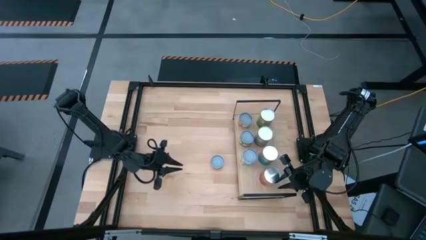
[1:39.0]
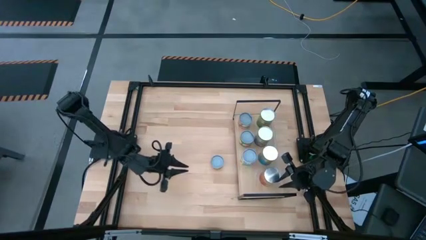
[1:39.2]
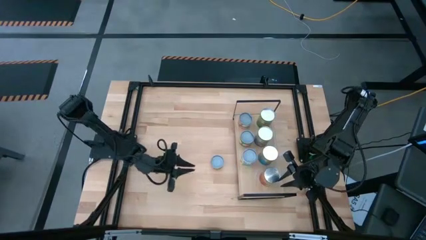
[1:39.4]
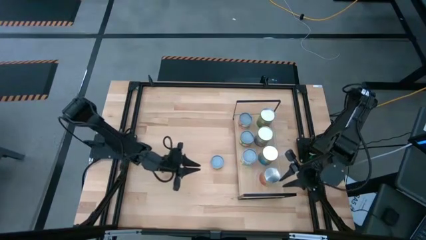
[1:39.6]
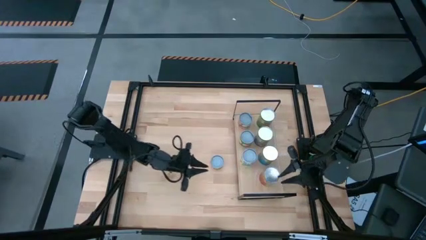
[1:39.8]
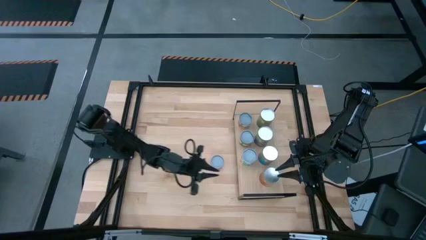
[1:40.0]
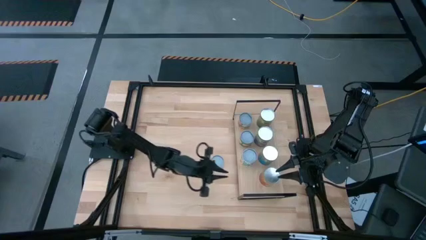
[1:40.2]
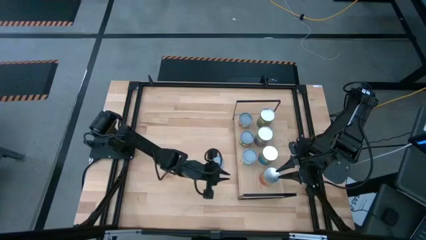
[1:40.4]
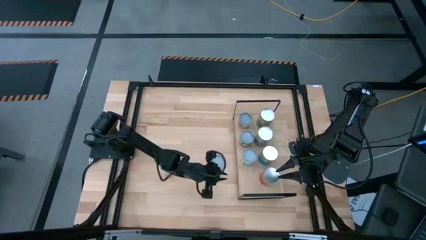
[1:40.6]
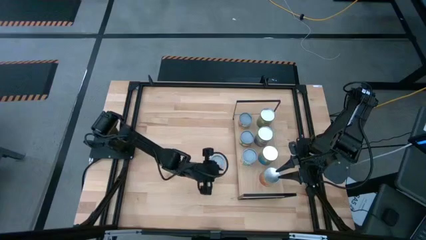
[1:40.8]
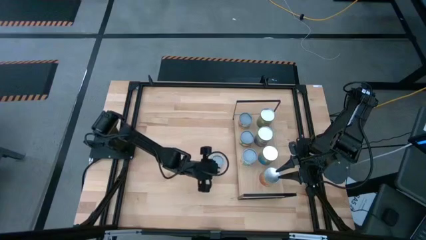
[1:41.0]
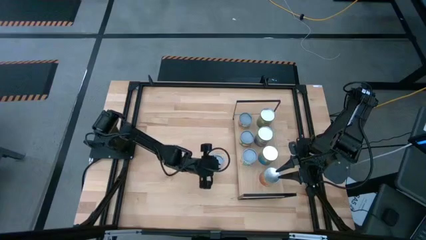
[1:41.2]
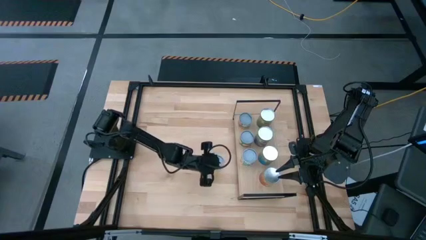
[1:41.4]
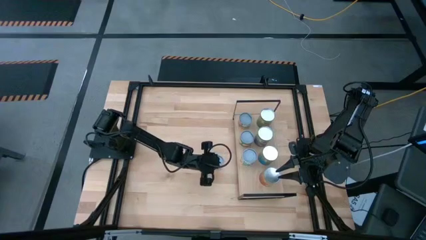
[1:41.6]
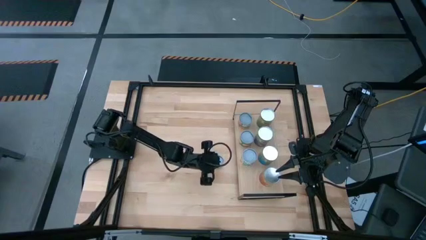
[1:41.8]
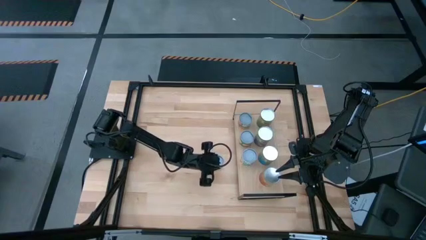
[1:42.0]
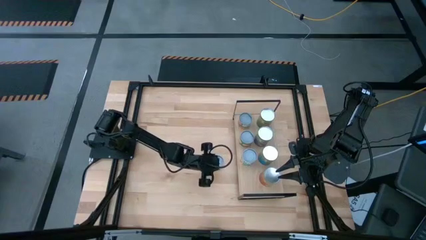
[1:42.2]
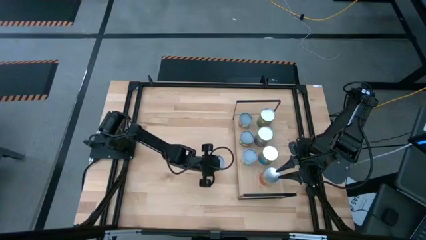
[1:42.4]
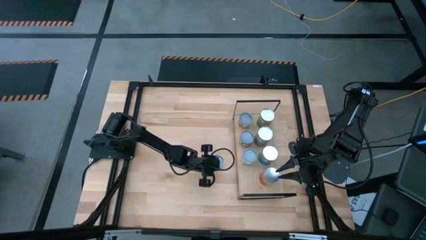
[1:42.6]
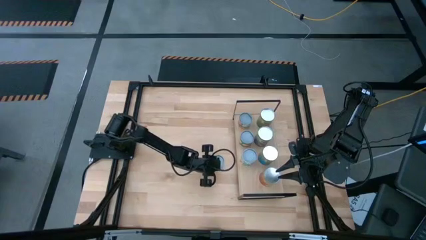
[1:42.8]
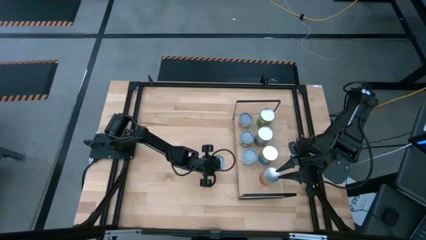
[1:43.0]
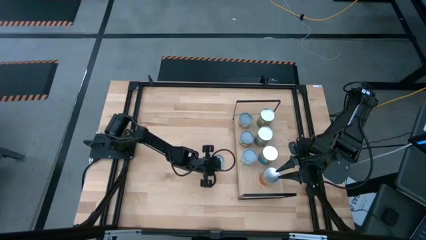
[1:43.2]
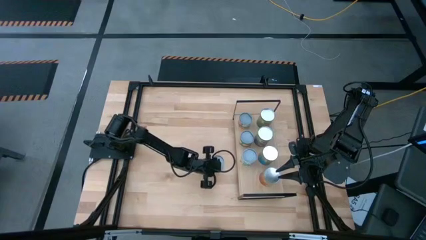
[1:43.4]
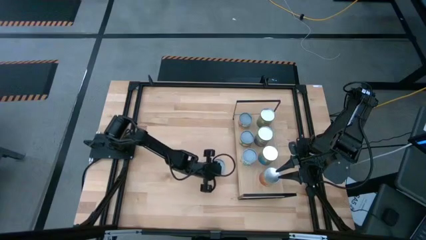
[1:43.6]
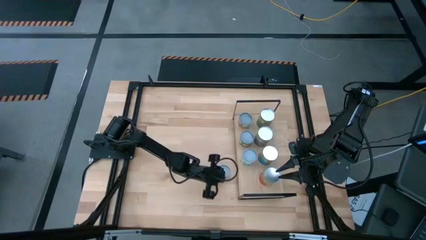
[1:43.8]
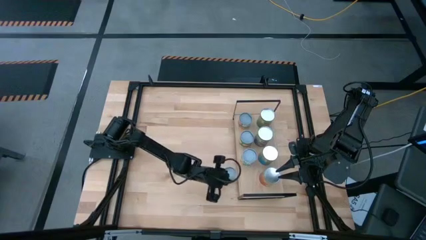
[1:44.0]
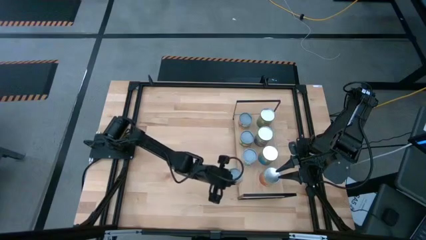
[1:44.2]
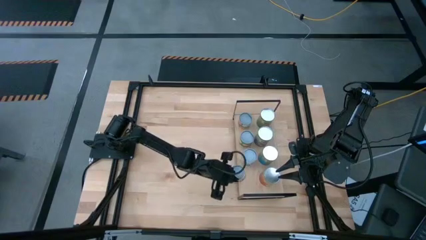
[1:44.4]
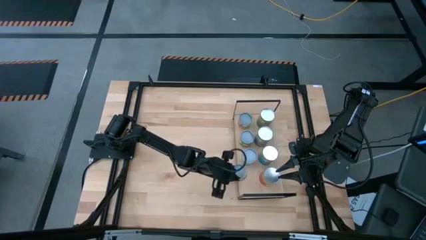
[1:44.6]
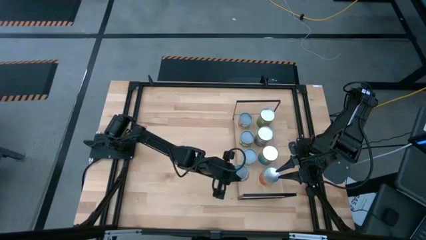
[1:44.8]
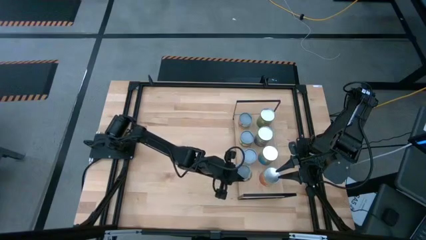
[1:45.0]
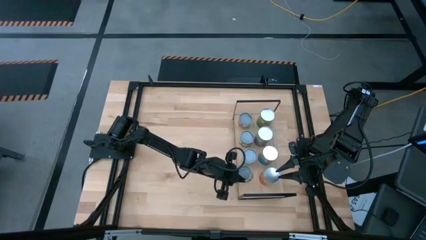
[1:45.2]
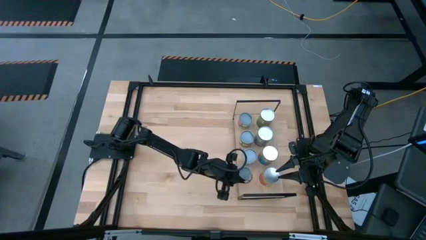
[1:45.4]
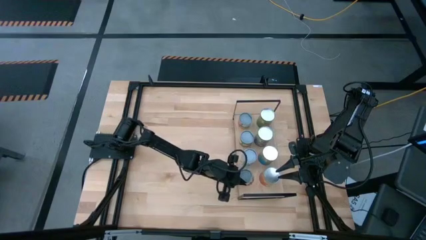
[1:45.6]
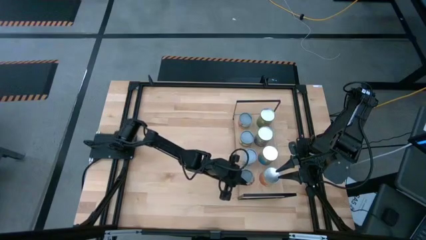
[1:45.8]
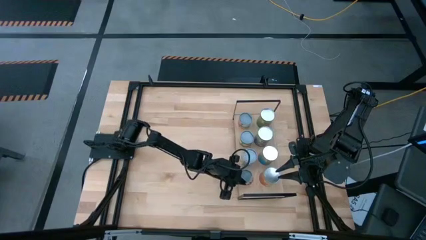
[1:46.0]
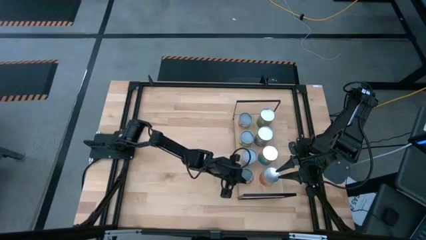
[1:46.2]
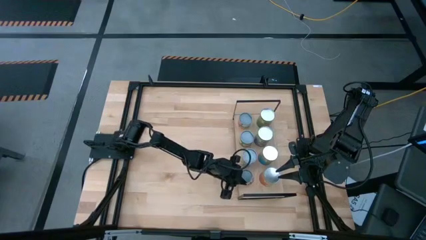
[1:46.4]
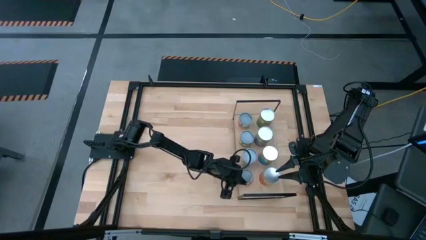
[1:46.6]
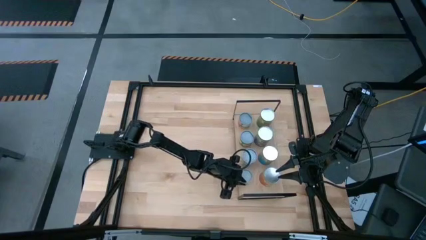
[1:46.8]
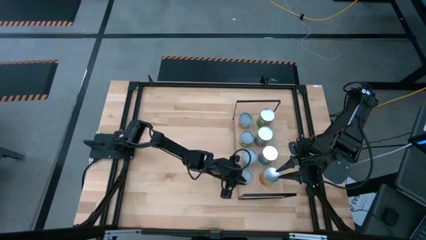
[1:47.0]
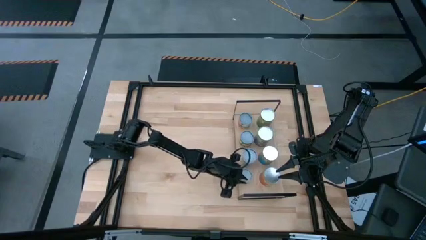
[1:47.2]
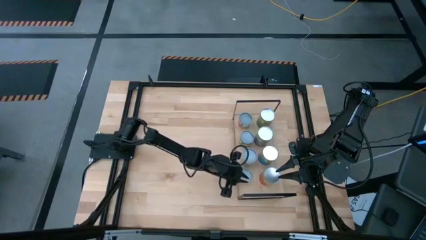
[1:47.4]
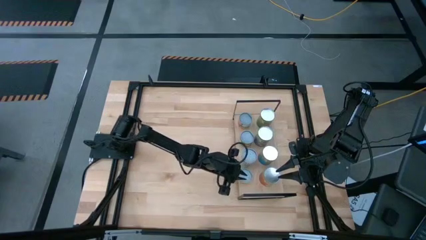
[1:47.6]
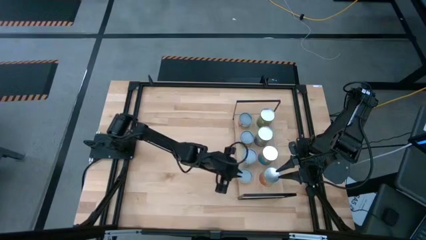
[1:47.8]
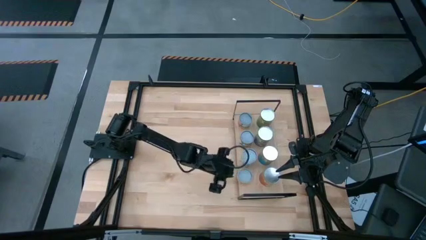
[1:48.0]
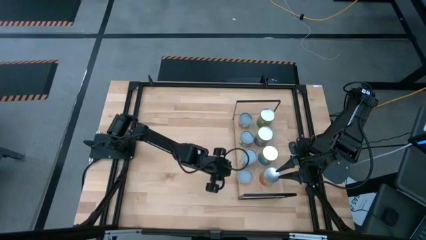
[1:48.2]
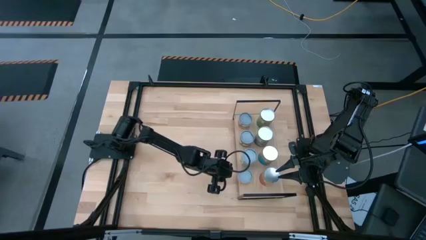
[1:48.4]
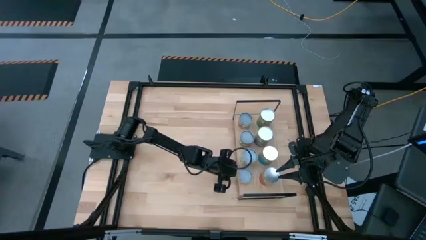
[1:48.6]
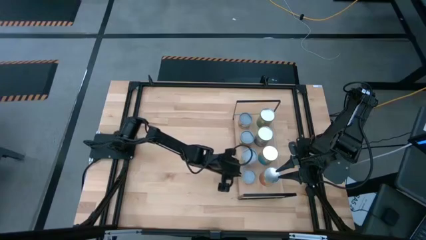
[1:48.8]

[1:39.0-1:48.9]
Task: Pick and place cans onto a shelf
Put the canned pineapple rings on the shelf

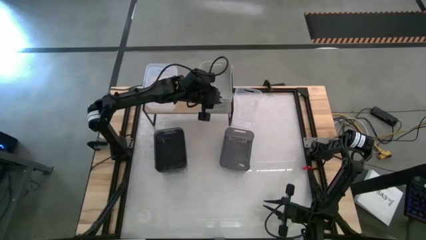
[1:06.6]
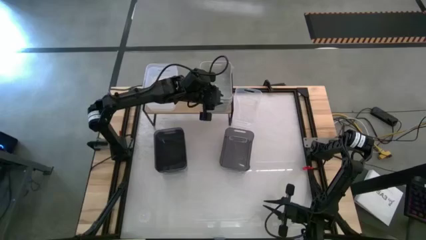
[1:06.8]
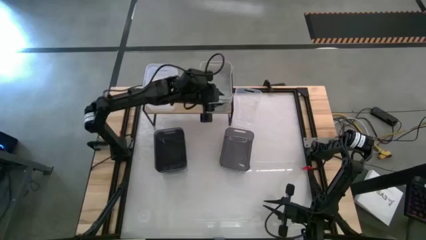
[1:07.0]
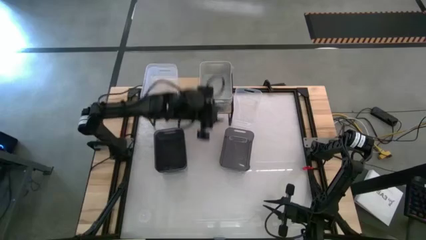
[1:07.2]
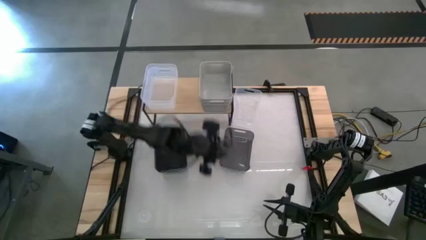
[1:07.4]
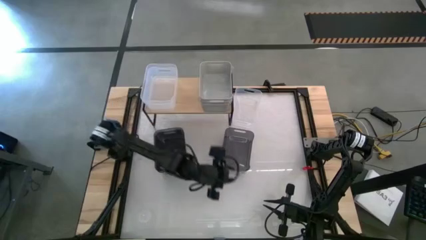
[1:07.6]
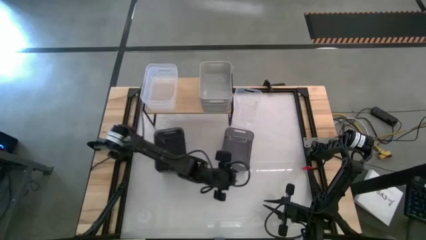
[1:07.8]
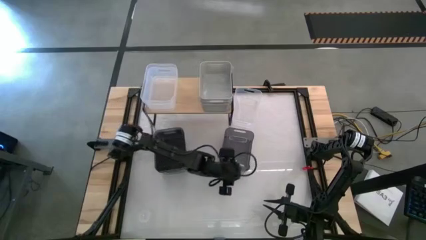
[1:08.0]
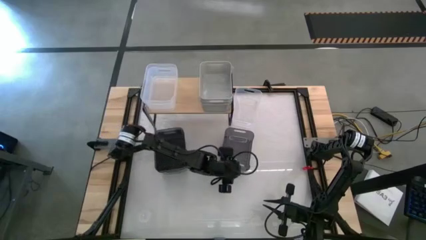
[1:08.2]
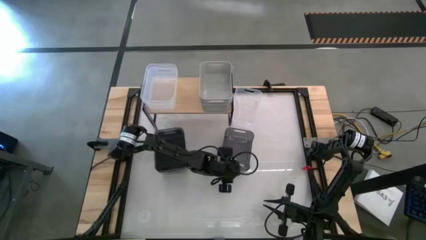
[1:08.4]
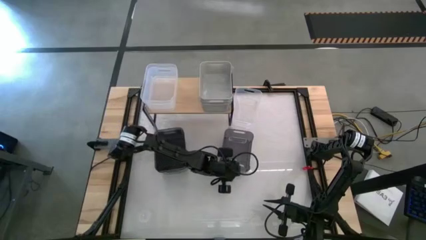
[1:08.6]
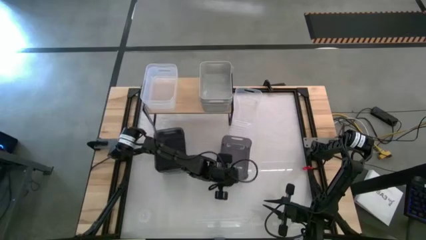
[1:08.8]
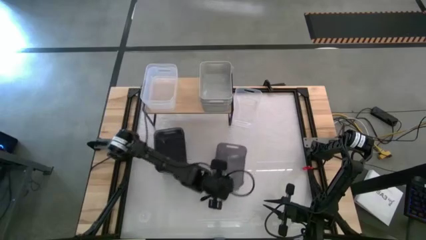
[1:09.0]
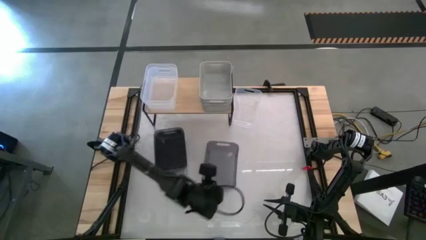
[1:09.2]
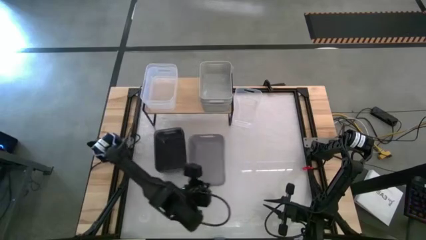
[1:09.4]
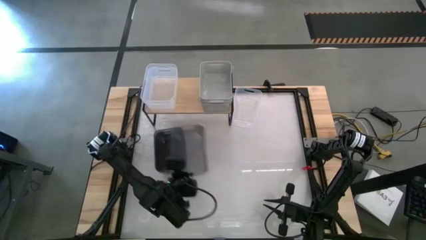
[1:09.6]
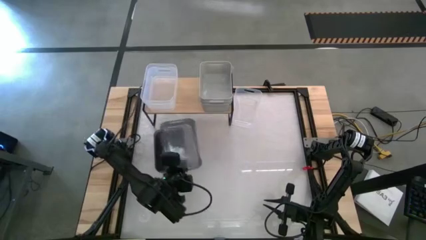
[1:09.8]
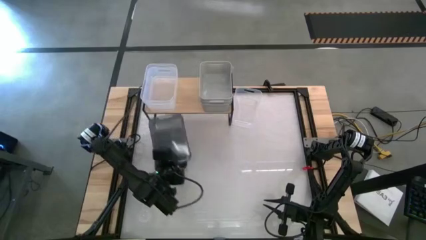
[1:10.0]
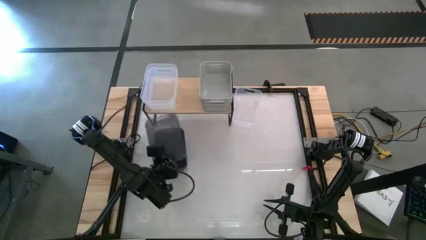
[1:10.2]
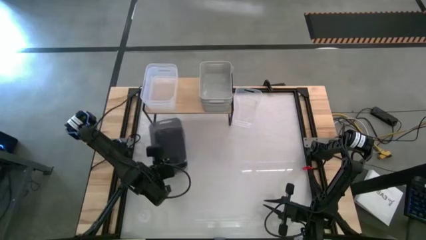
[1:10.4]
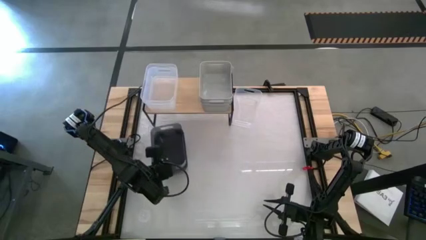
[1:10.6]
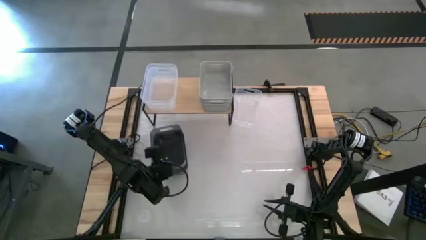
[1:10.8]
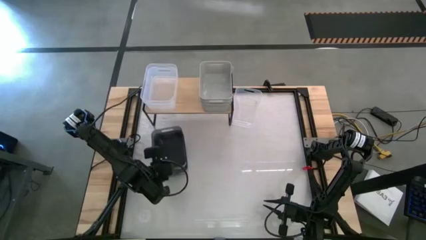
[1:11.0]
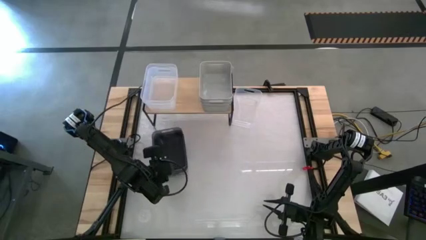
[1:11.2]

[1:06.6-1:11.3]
Task: Stack baskets on shelf by color
Stack the black bin on top of the black bin
